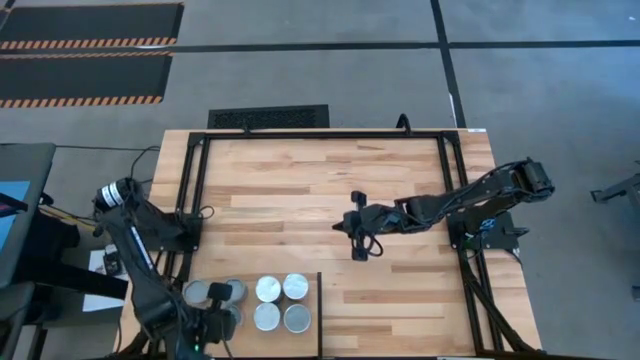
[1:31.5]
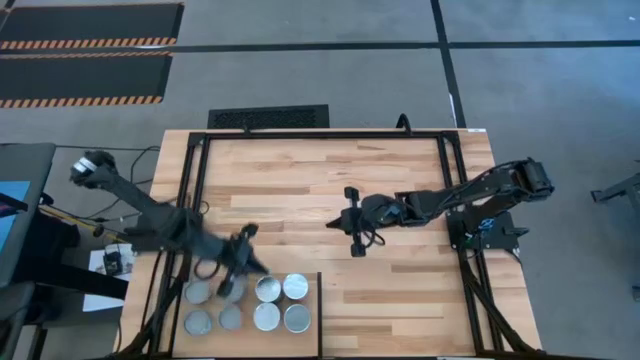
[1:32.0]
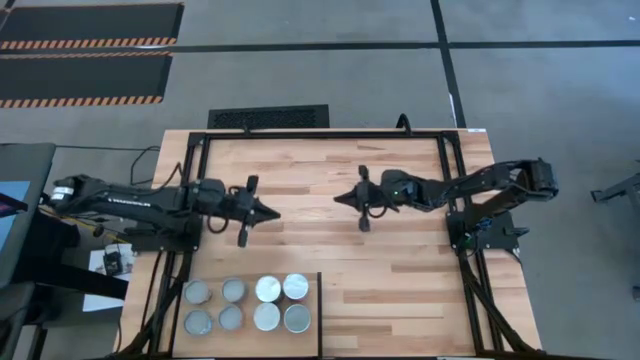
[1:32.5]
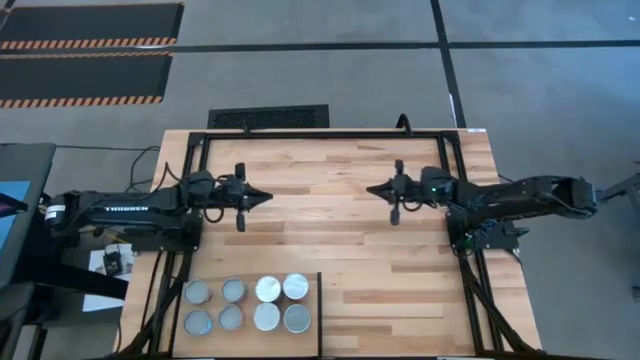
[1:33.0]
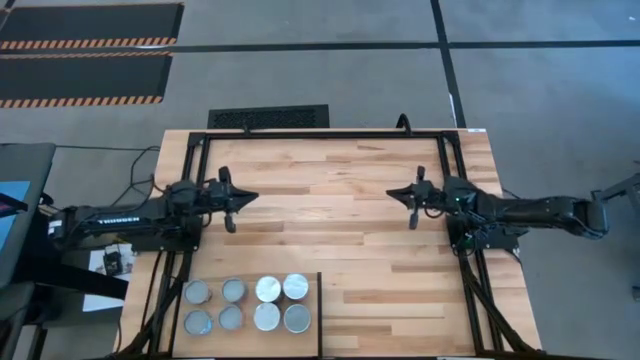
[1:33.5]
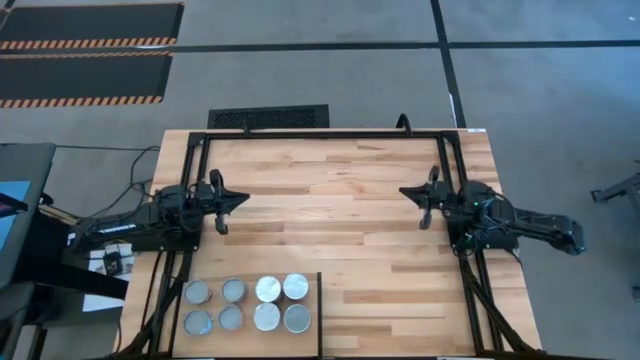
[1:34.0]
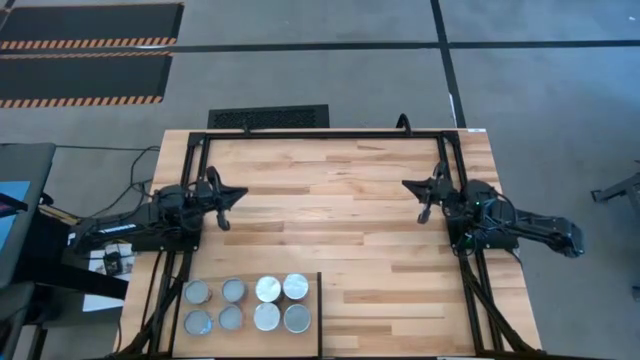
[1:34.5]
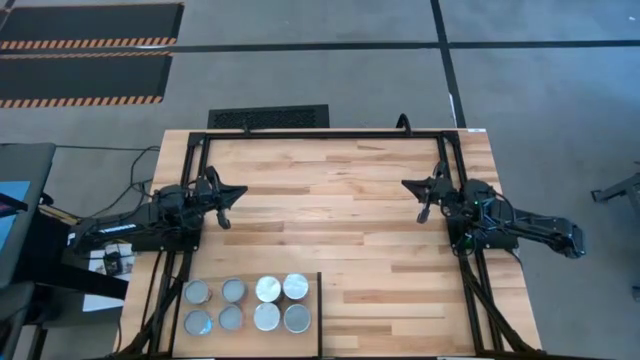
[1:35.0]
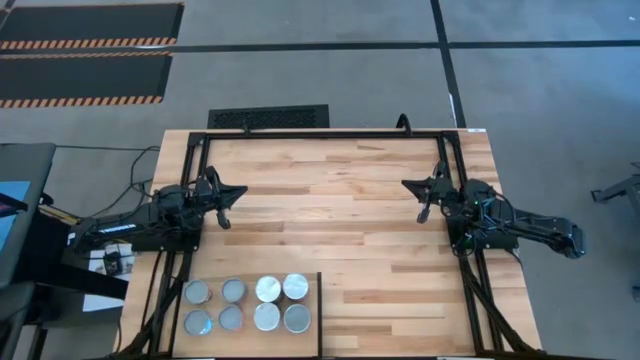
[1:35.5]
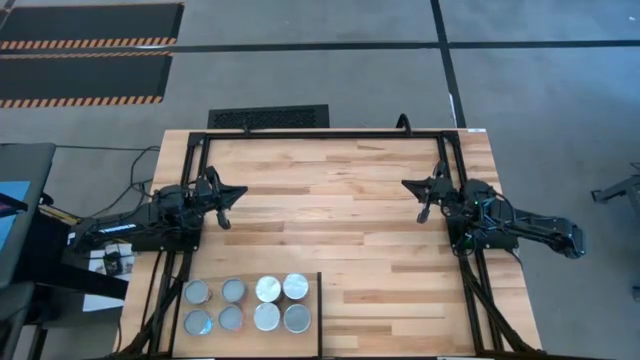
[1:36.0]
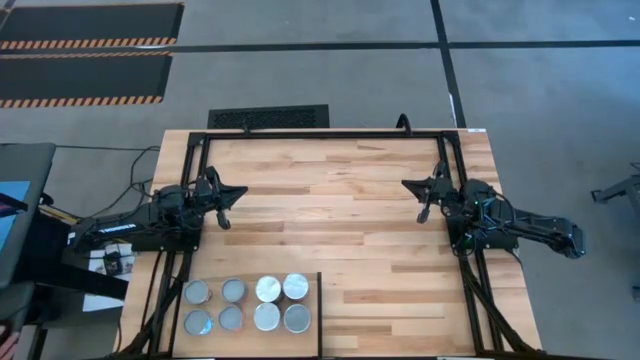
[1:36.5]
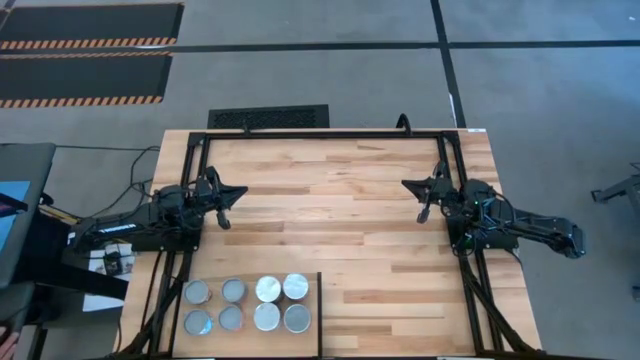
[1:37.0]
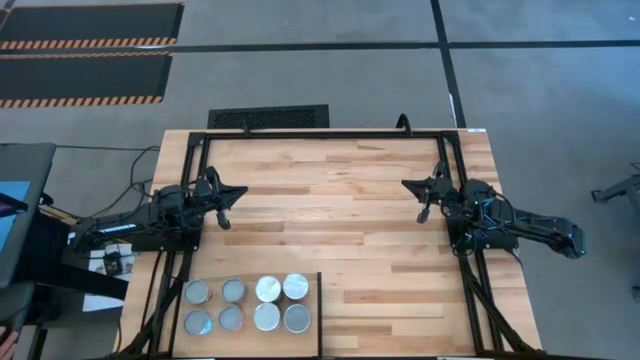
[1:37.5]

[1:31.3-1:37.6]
Task: Pick and place cans onto a shelf
Return to Home Position

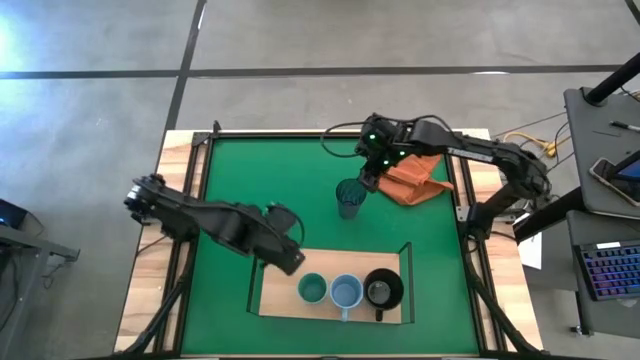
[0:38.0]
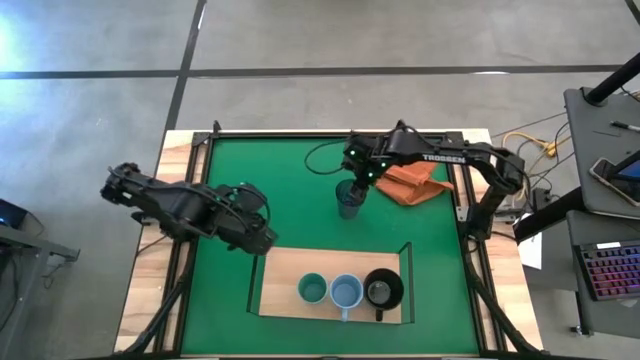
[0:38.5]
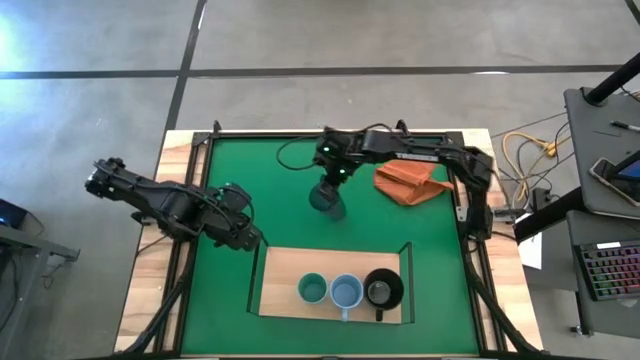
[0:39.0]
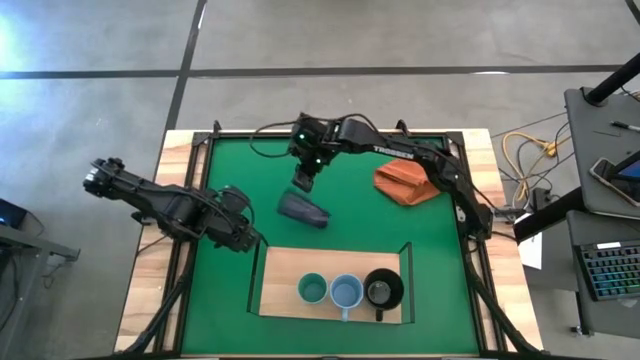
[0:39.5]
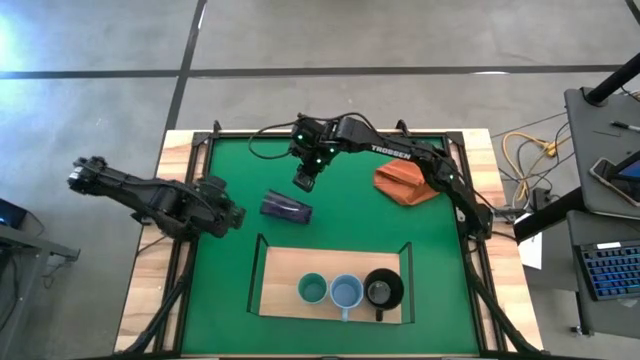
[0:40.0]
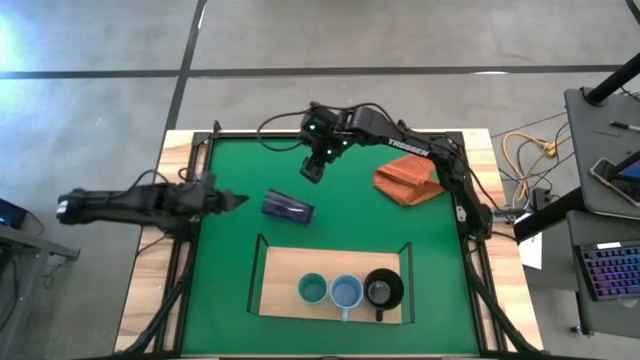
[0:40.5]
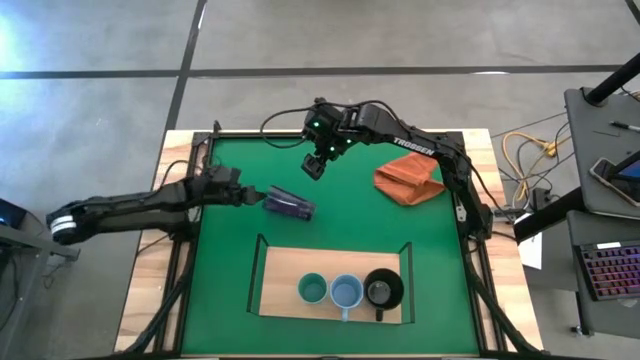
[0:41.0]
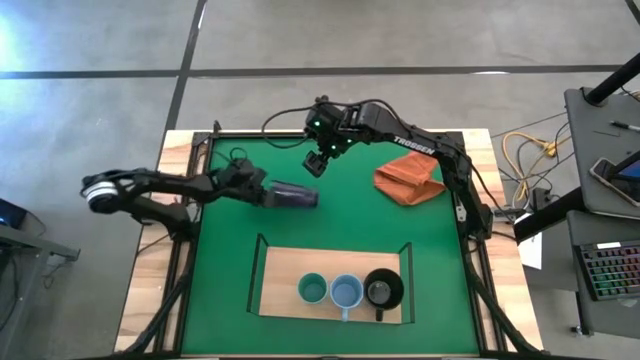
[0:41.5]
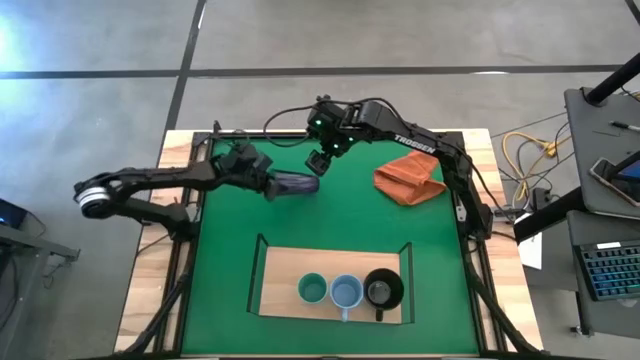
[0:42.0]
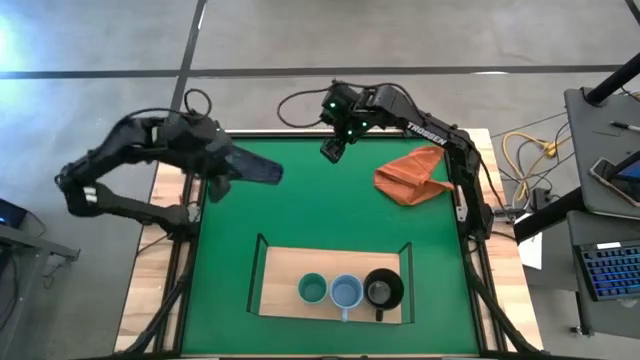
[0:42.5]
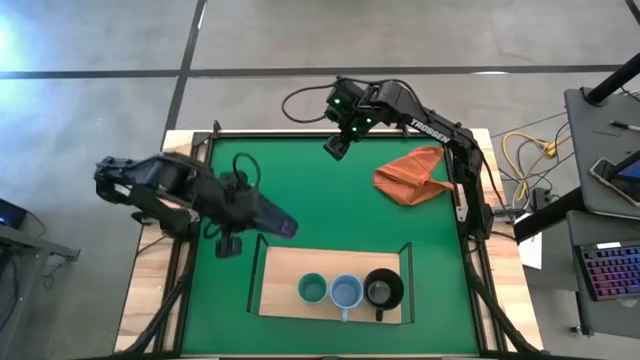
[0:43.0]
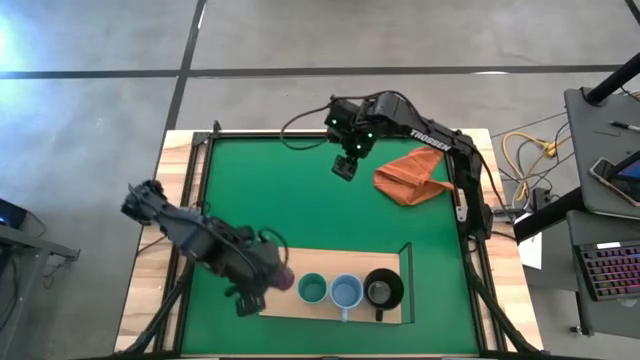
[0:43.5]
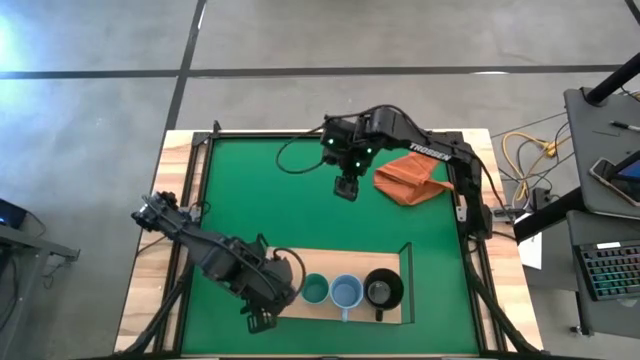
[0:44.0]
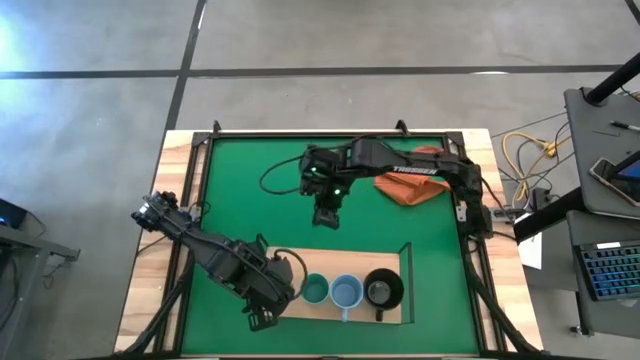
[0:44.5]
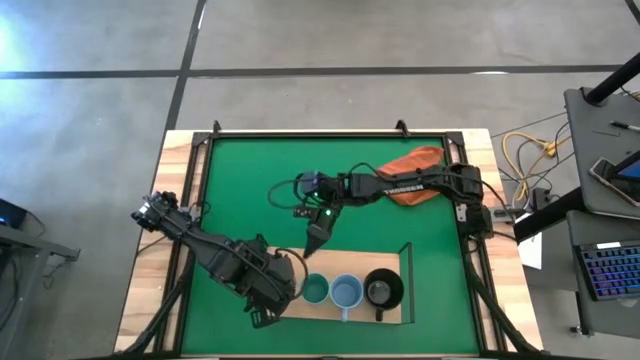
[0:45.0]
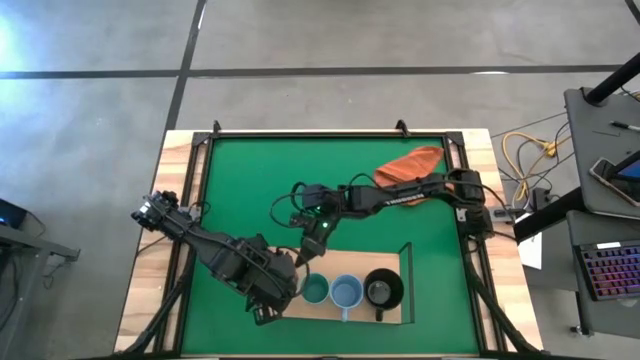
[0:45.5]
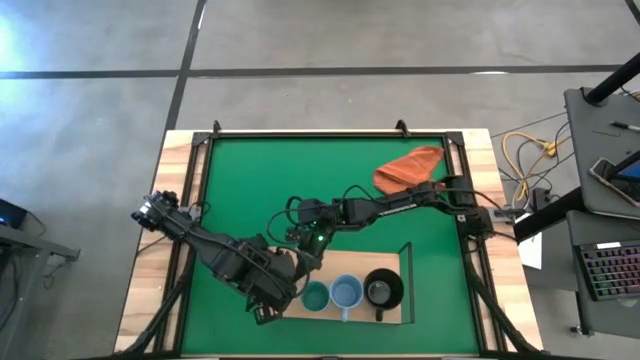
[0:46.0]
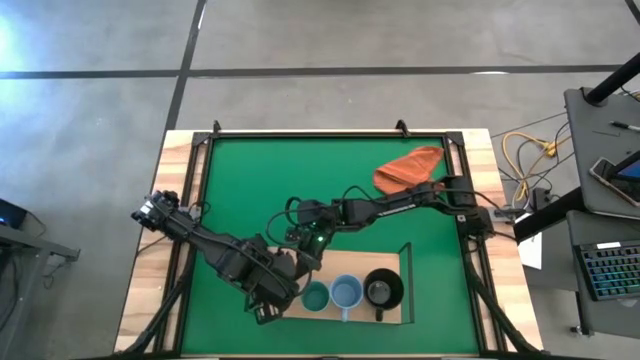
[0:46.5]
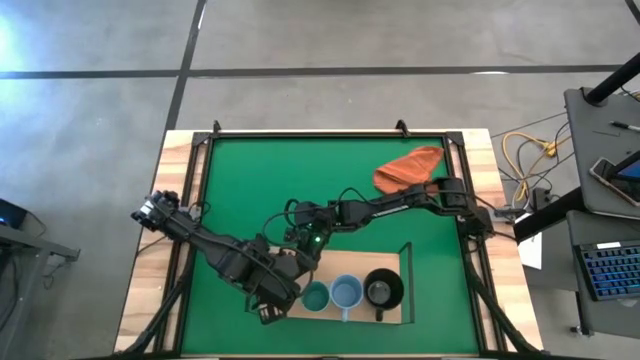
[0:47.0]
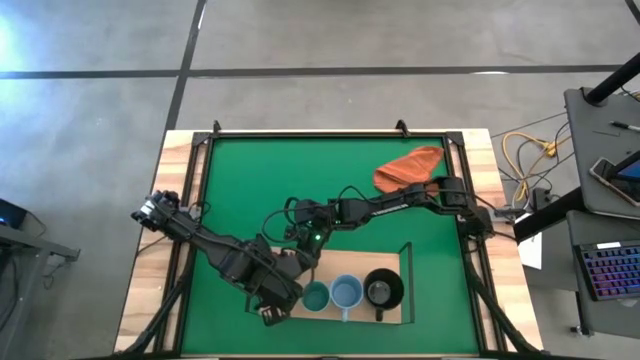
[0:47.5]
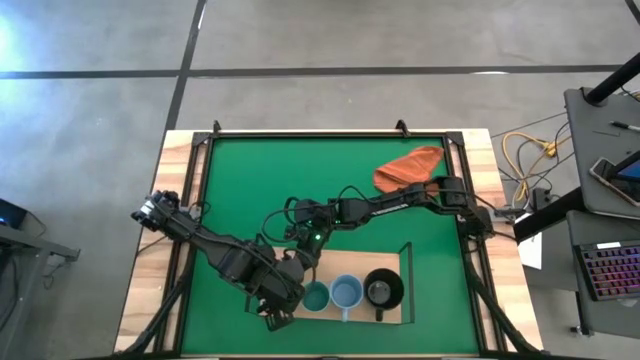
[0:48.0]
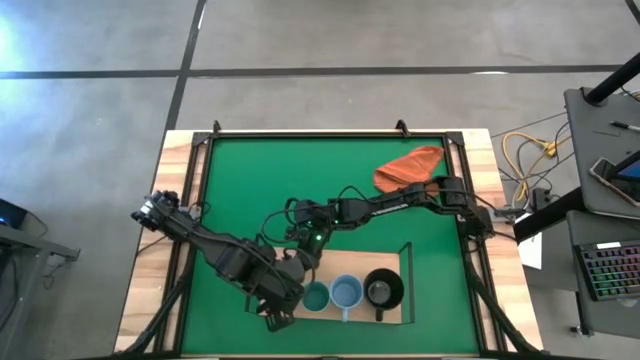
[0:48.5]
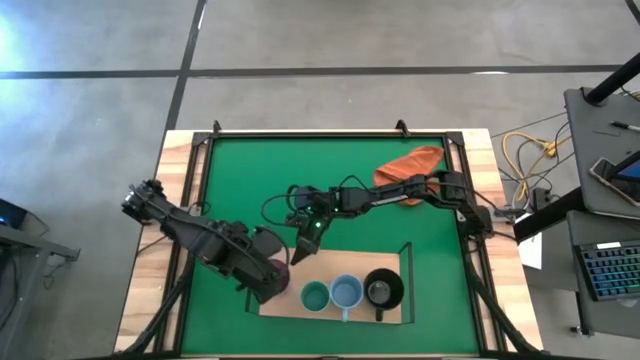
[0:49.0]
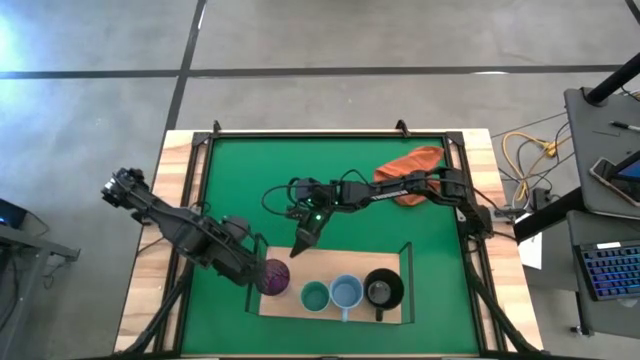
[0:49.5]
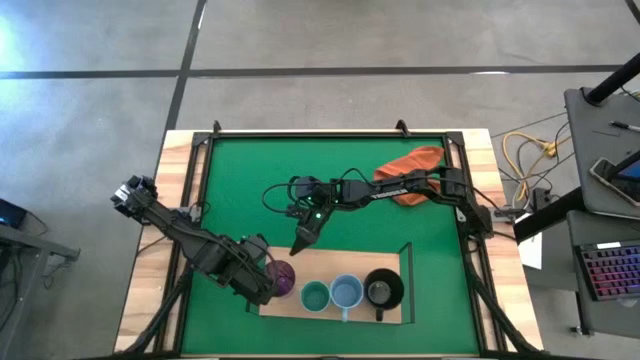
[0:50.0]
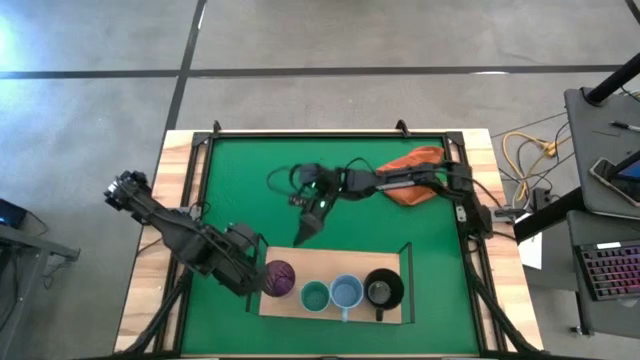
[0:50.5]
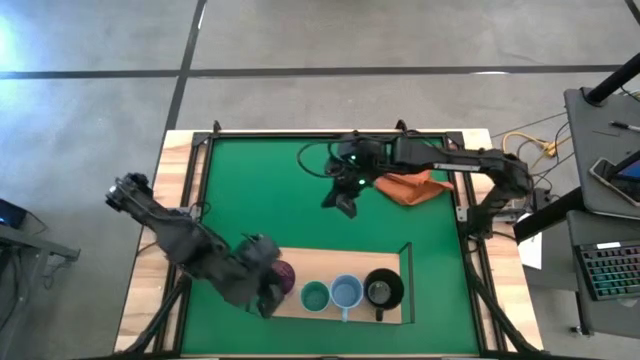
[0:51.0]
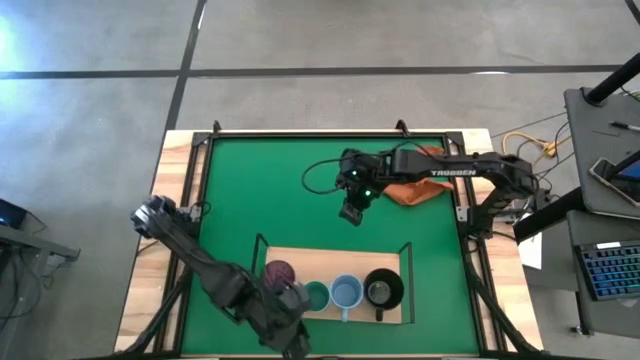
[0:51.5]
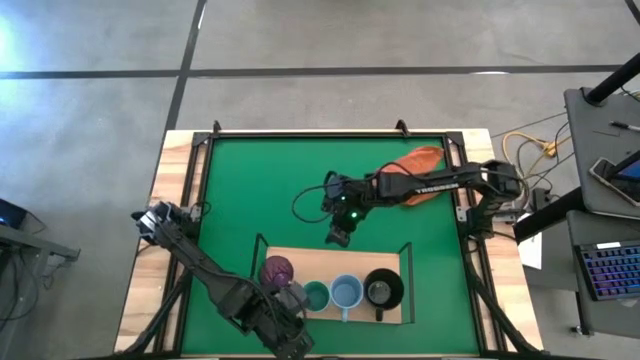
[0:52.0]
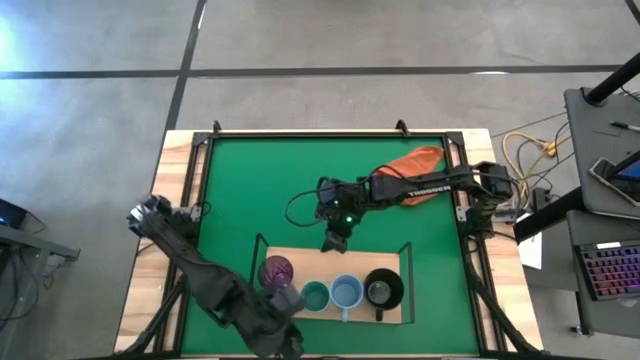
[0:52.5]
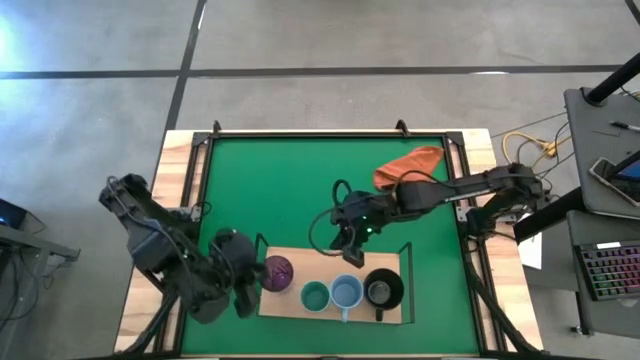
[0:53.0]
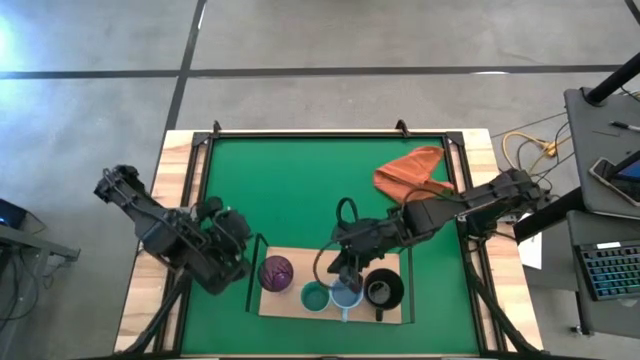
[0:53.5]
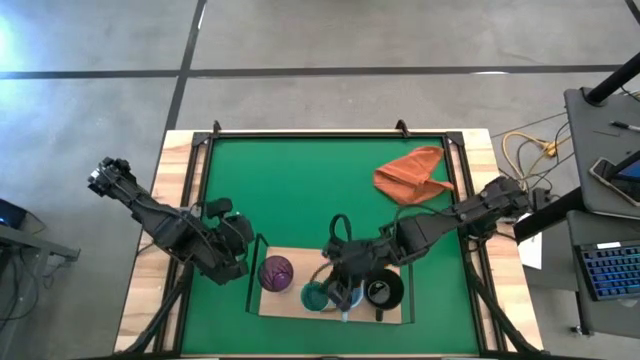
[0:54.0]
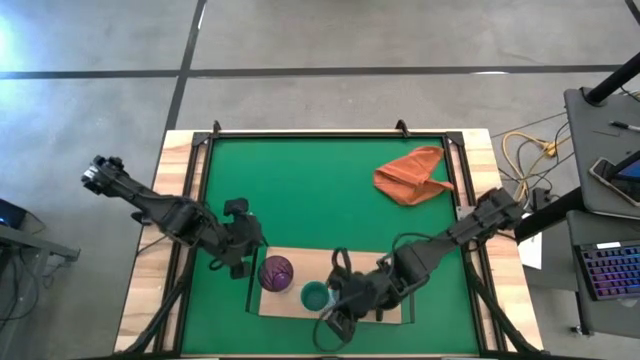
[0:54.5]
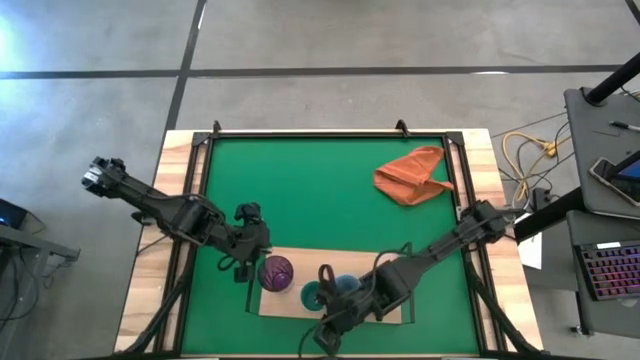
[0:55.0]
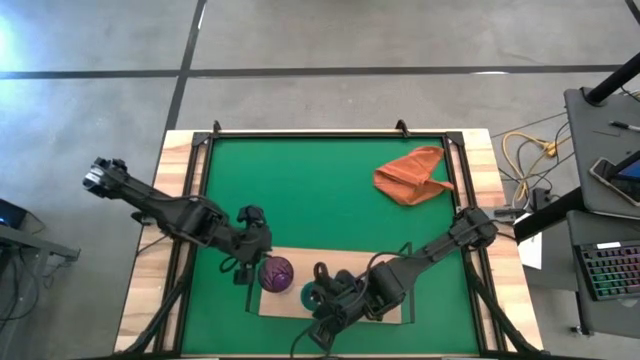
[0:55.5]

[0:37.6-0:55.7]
Task: Stack small to large cups/mugs on shelf
Put the violet cup on the shelf
